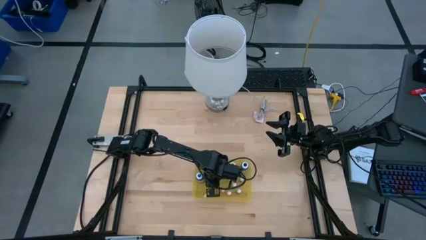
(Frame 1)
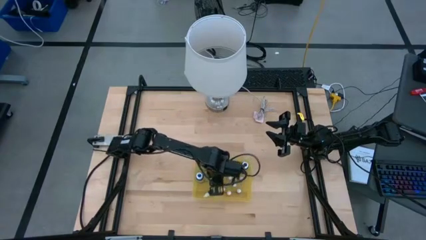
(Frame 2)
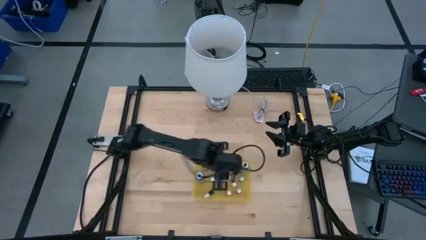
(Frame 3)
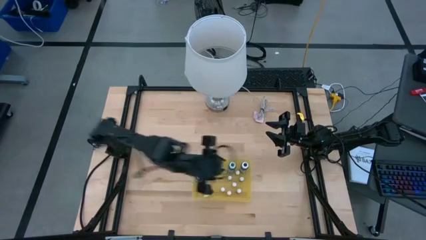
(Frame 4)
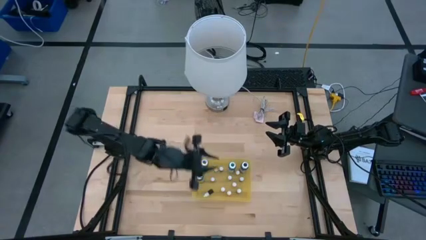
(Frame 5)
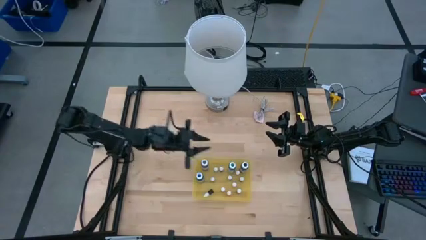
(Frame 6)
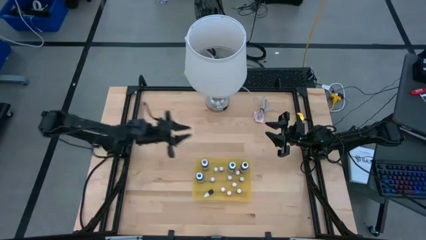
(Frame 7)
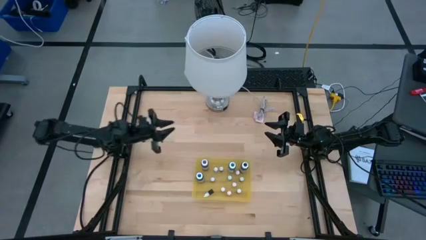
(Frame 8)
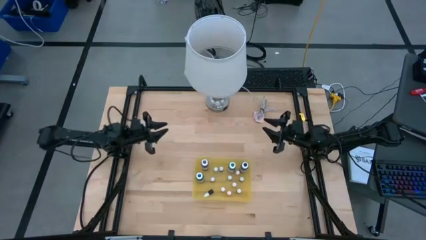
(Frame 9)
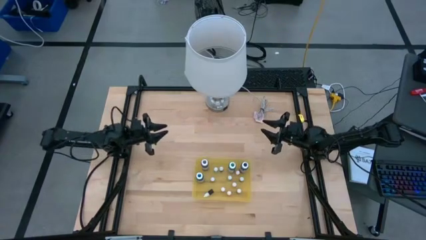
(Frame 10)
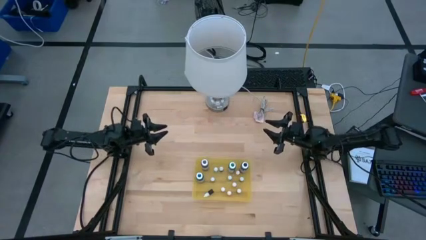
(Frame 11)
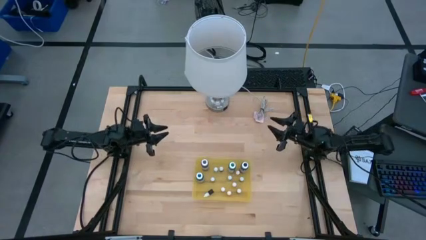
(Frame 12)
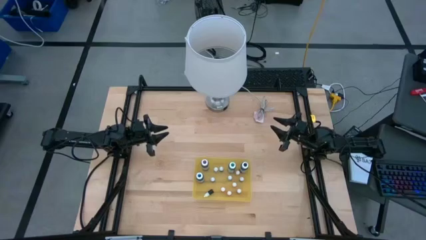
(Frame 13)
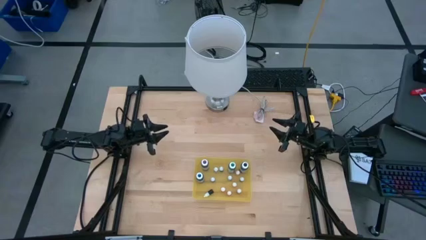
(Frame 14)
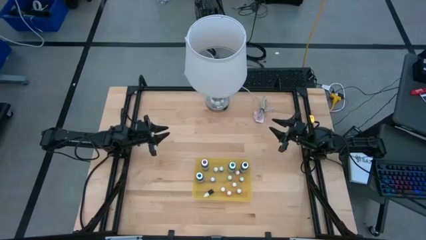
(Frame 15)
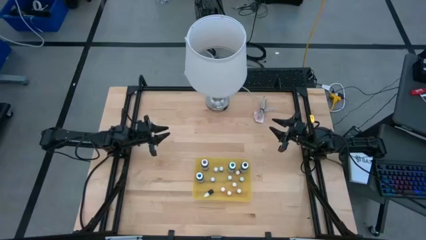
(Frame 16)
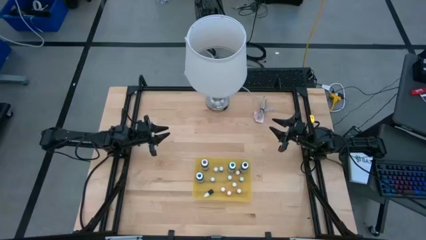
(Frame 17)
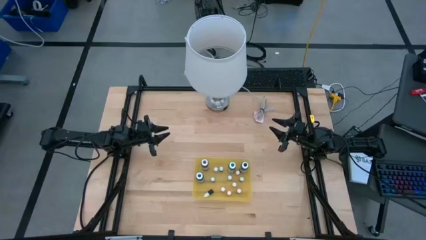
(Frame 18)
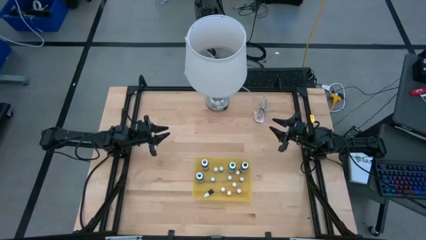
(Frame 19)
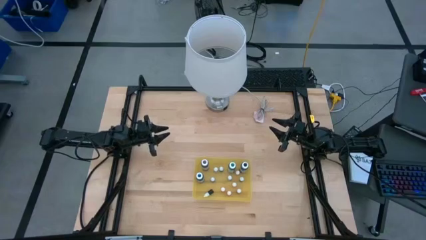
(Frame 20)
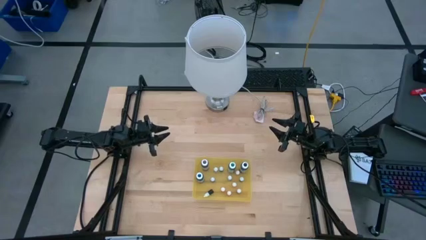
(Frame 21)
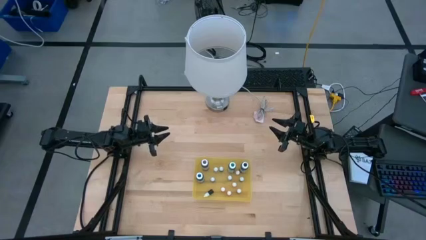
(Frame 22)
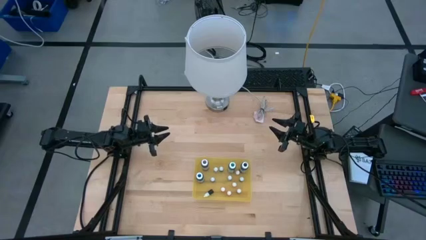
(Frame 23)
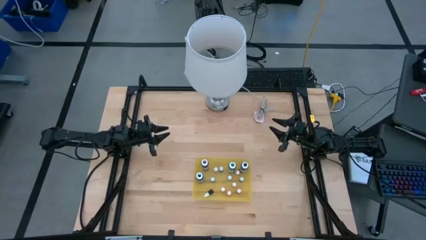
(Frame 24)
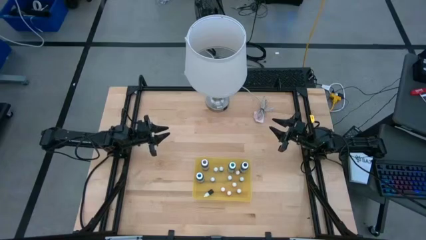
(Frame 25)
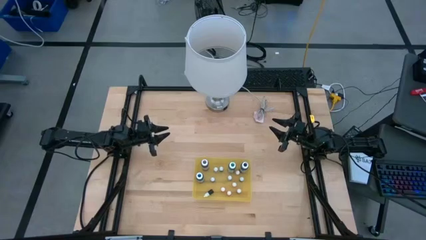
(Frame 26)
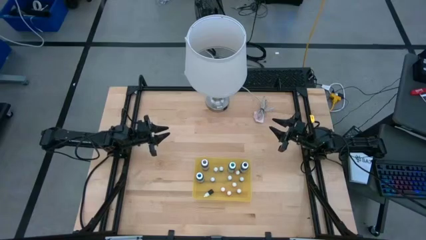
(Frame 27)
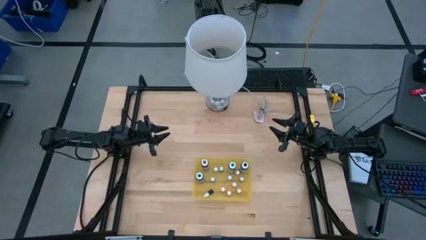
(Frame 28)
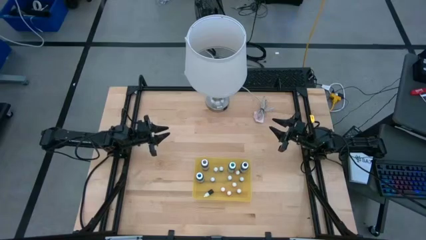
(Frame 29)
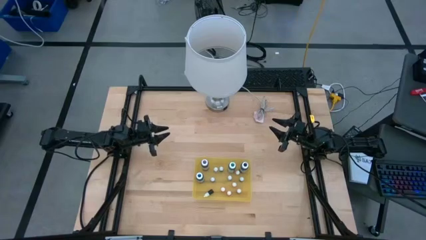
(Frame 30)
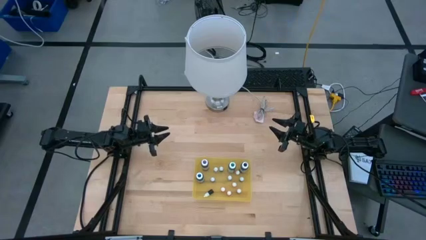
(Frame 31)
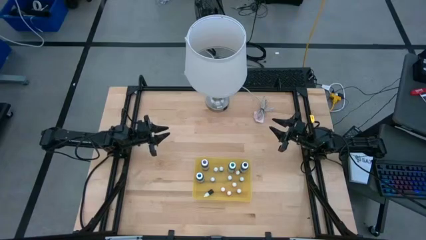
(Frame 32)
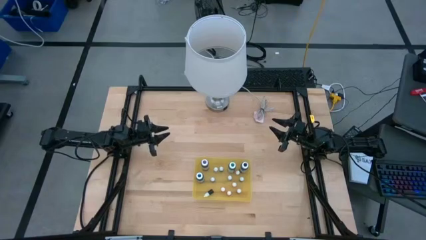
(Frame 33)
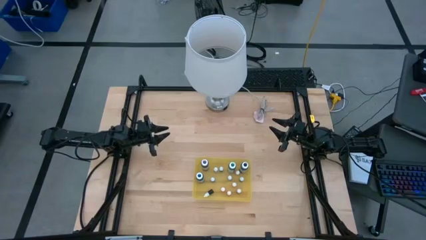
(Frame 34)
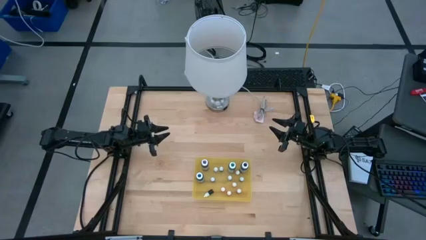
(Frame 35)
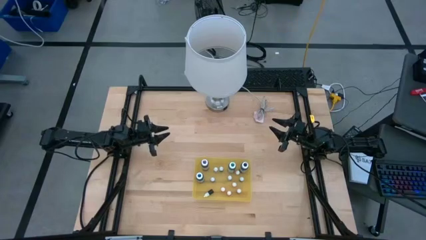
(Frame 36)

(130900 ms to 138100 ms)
Task: Pick & Place food coloring
Return to Home Position

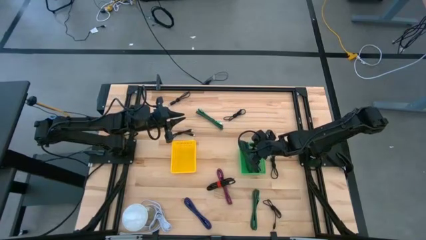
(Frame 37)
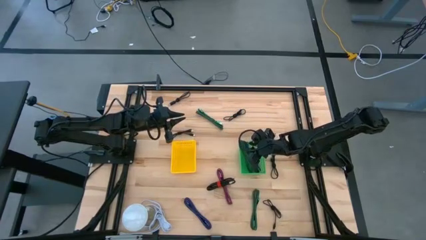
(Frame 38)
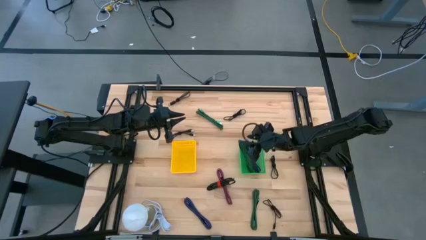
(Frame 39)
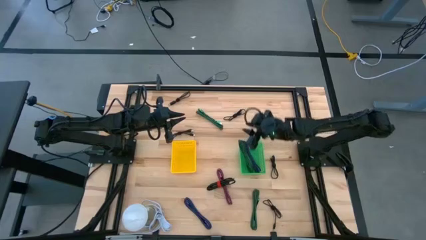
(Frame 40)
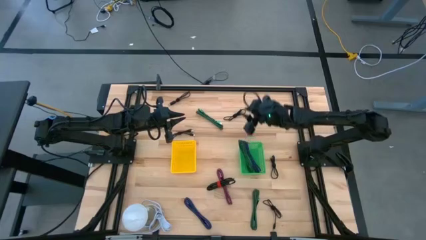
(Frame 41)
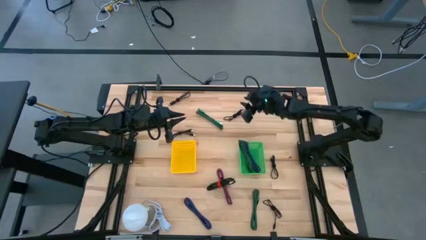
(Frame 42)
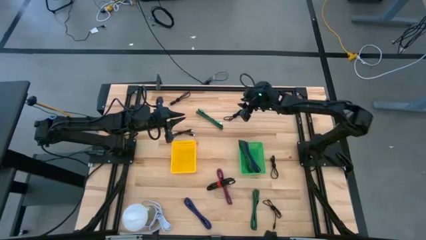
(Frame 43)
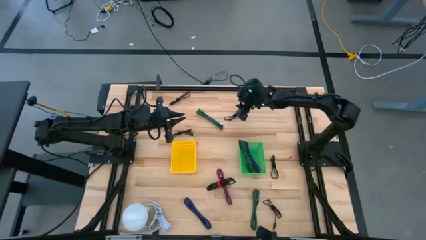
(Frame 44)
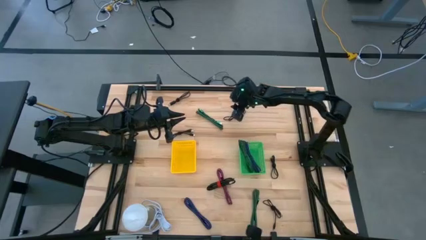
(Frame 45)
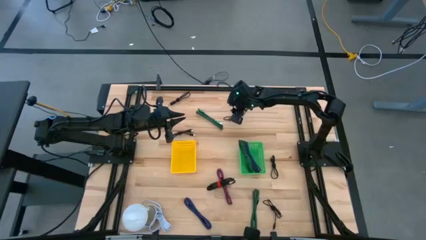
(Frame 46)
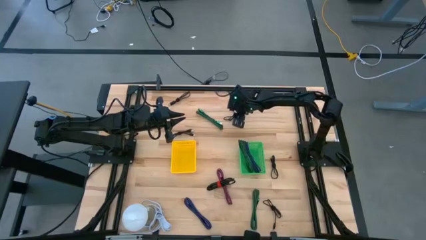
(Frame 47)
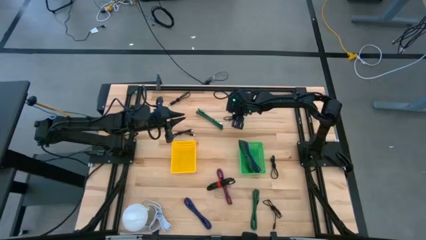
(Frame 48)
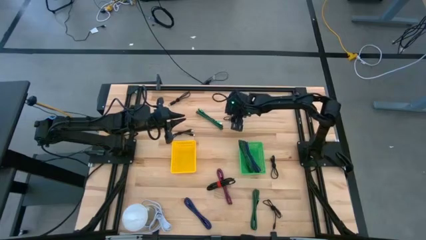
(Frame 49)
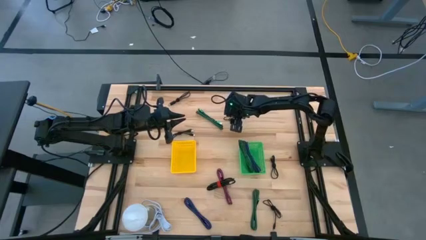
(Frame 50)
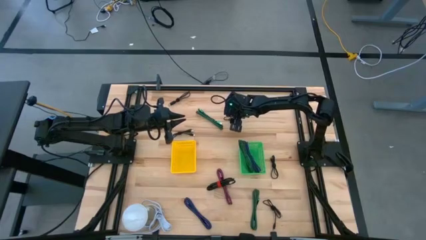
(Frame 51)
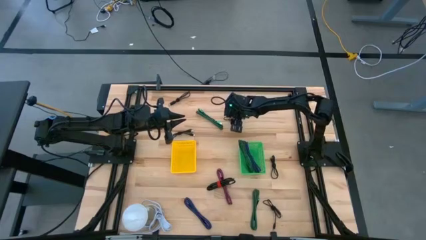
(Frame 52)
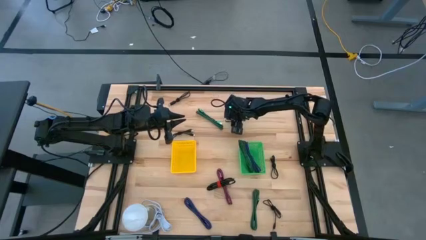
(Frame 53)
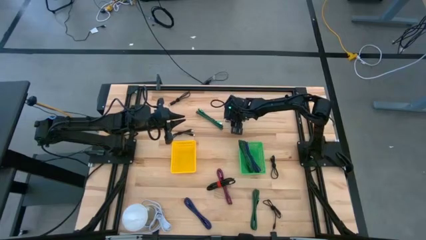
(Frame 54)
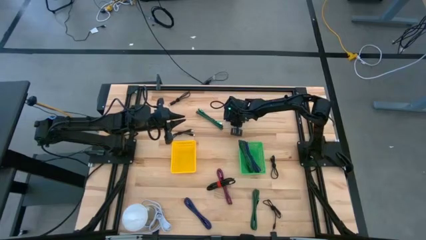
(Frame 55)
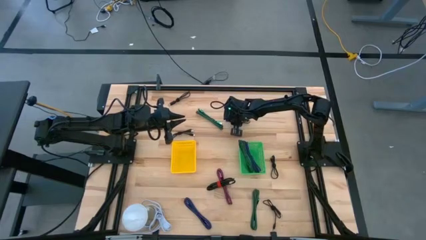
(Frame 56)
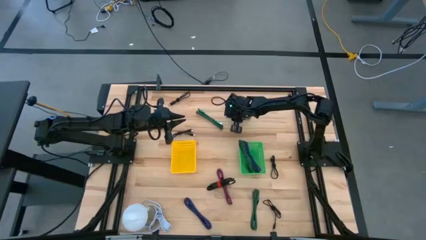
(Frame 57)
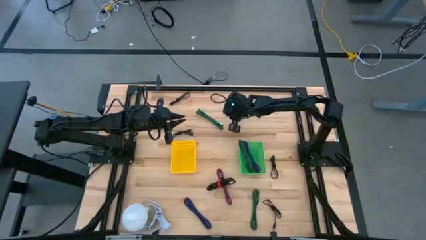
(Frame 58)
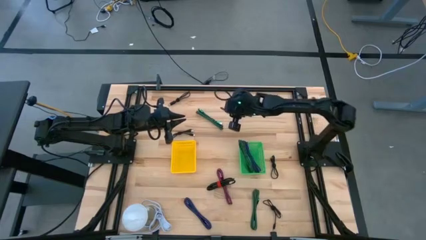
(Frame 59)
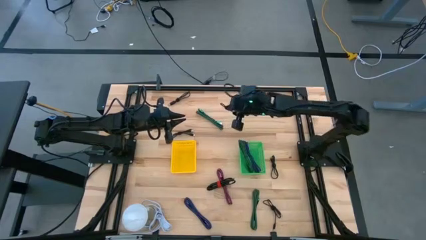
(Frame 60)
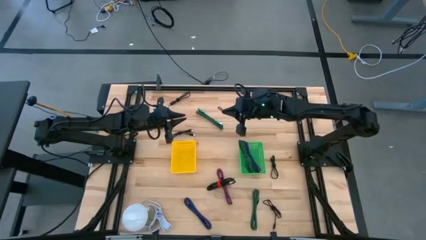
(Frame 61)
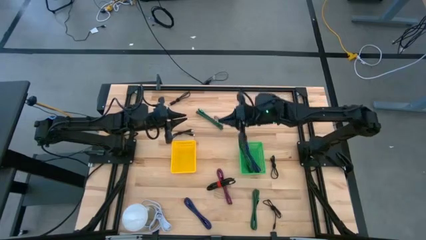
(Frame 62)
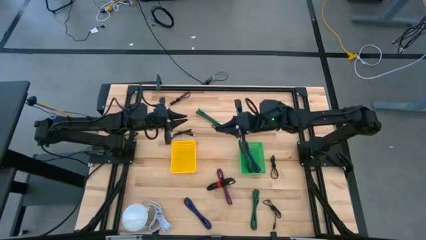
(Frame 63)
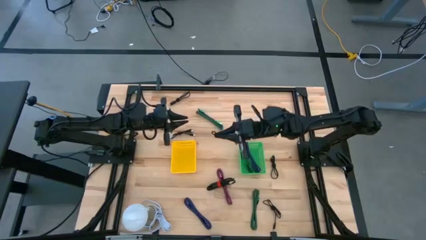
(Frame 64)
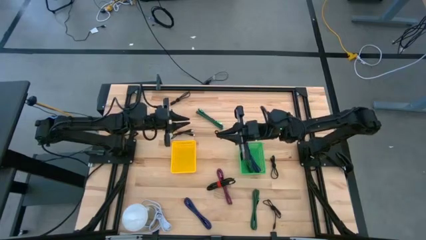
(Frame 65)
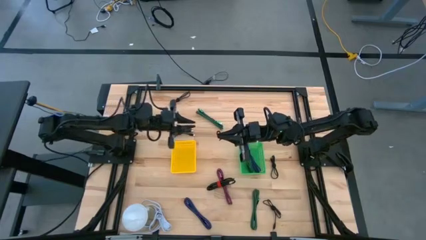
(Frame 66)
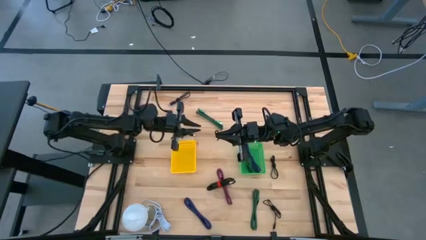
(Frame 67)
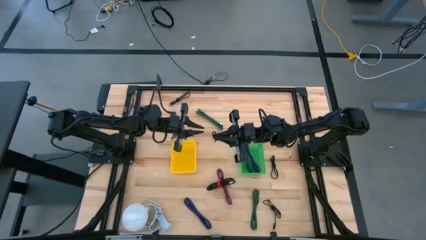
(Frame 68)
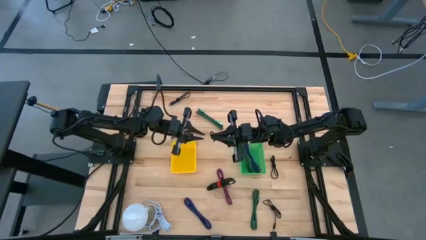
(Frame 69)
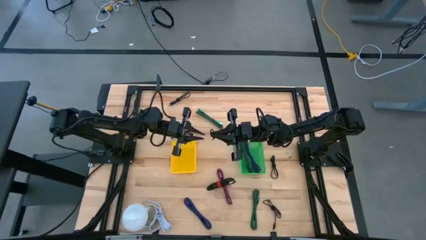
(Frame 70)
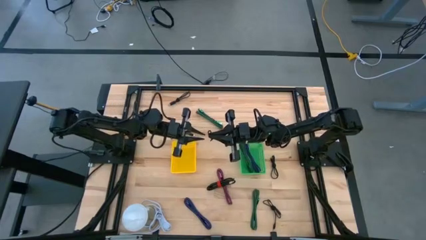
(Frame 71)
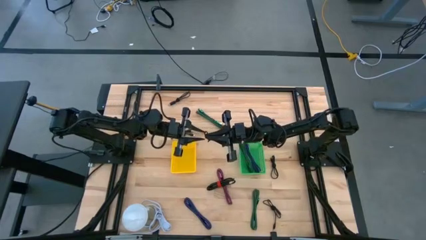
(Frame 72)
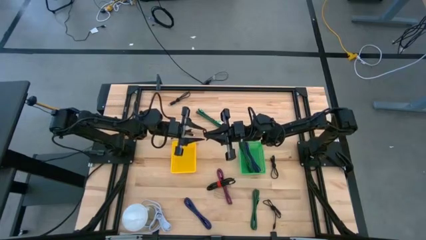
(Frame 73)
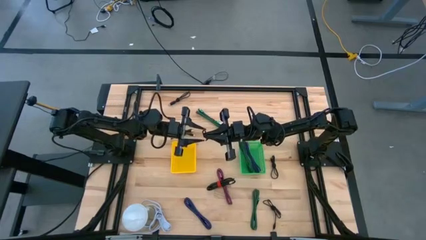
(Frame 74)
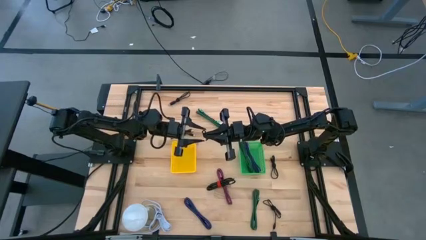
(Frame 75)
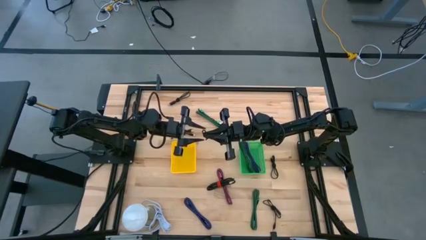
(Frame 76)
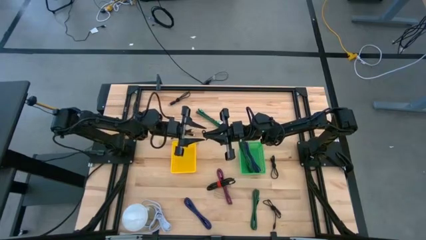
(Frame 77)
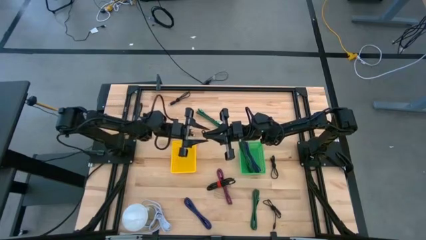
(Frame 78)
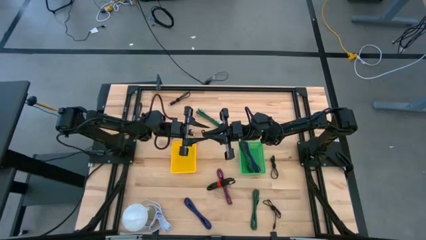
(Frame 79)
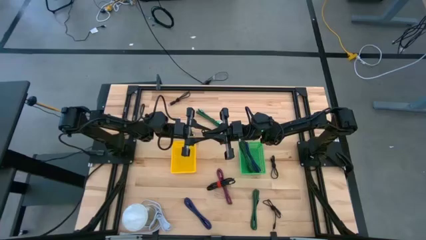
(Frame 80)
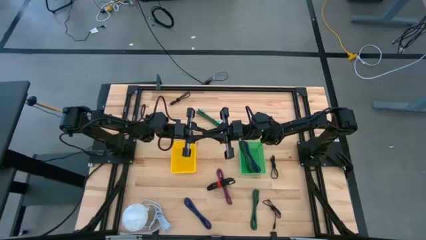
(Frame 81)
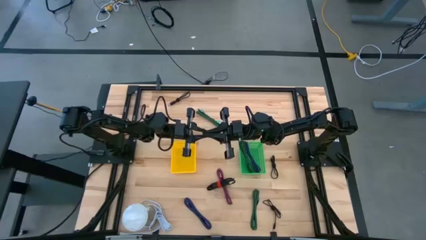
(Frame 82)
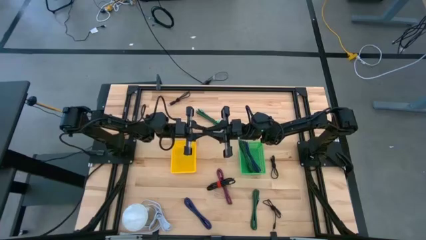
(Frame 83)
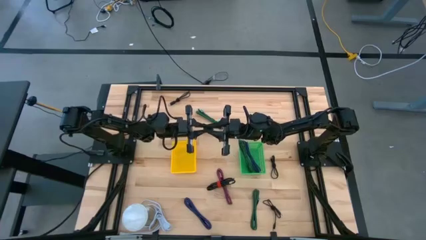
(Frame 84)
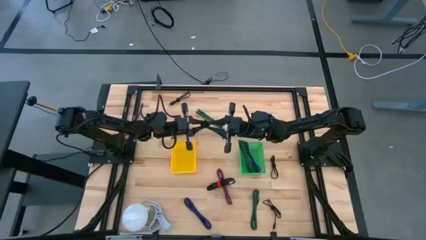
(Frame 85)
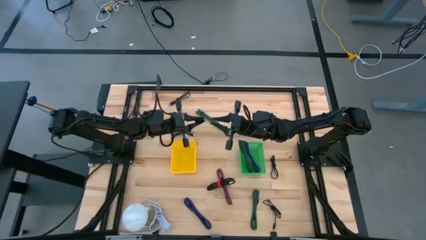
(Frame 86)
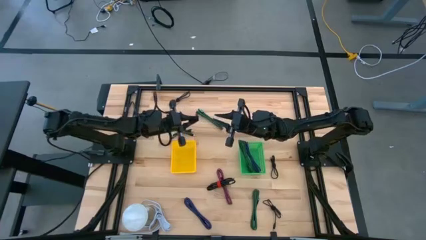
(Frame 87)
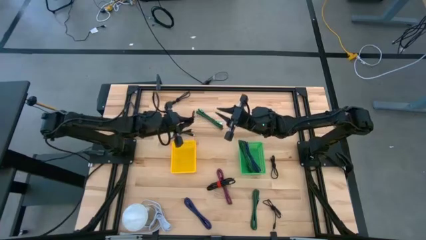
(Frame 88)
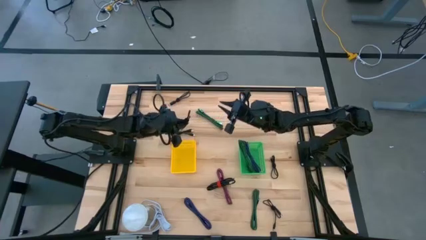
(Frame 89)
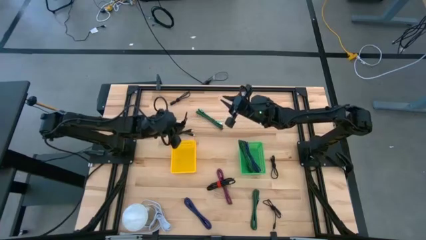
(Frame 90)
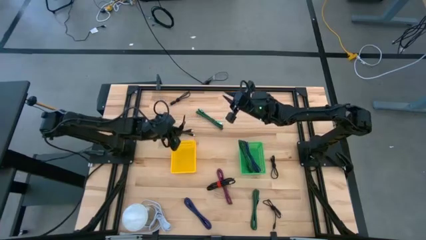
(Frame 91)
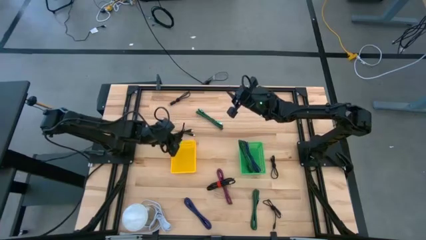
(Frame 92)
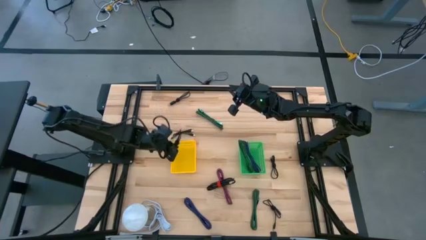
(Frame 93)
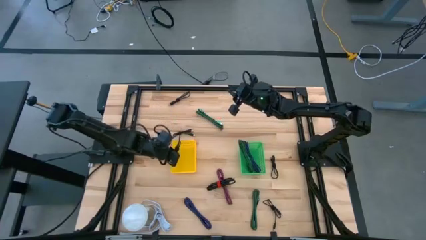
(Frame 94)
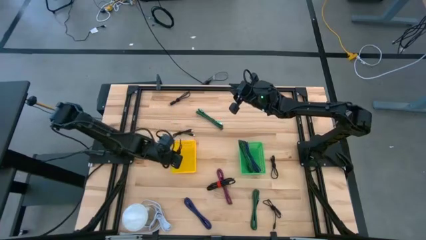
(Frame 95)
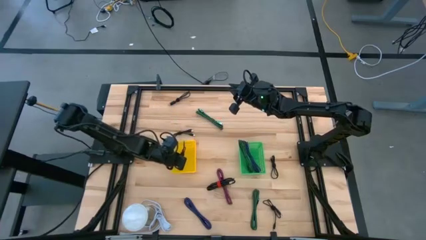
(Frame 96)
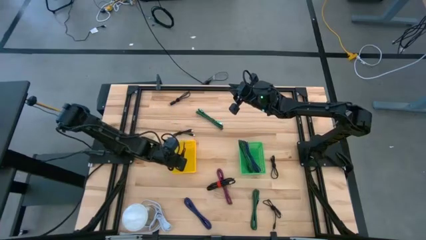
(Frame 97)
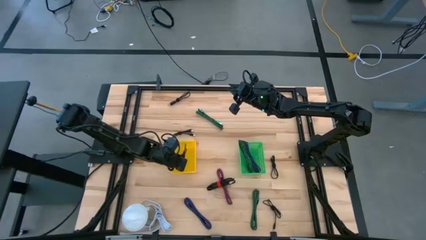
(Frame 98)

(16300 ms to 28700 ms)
Task: Pick & Place USB Port
Put the black charger cable into the yellow bin
